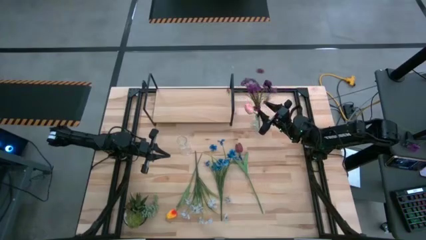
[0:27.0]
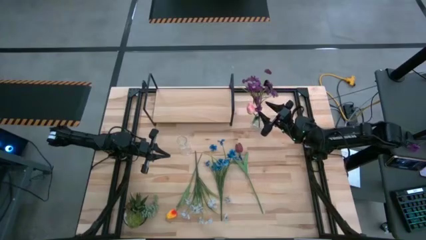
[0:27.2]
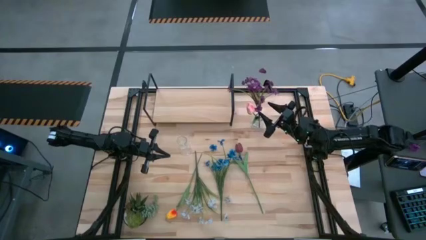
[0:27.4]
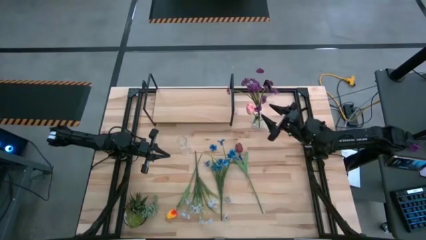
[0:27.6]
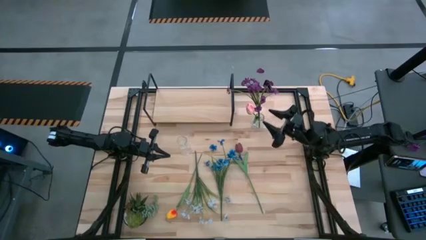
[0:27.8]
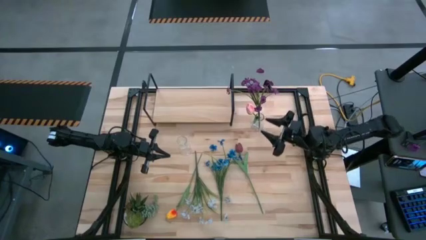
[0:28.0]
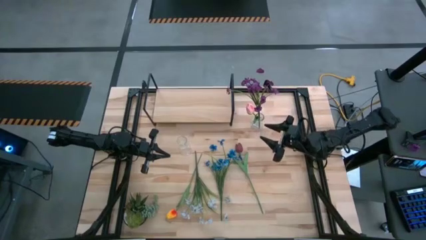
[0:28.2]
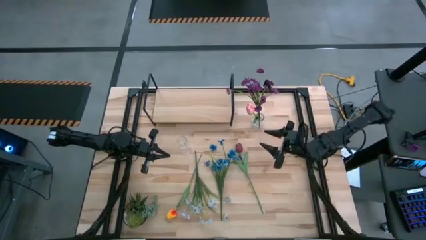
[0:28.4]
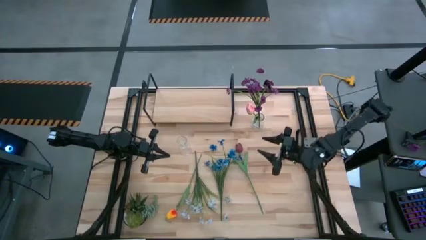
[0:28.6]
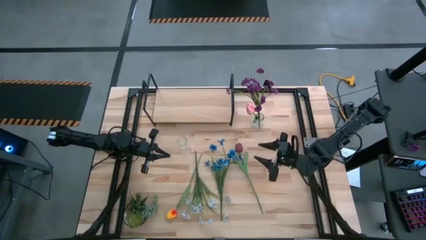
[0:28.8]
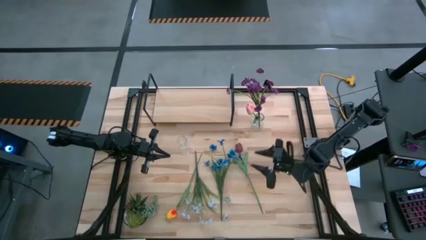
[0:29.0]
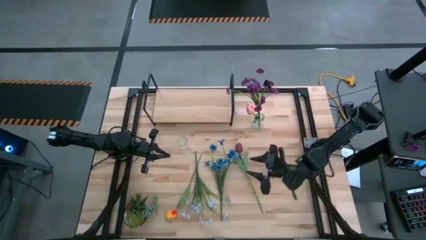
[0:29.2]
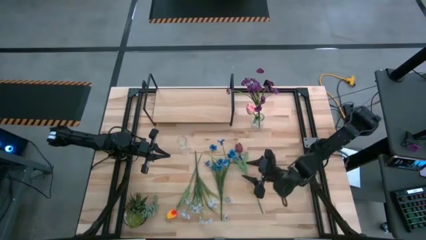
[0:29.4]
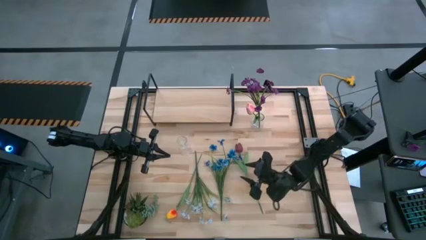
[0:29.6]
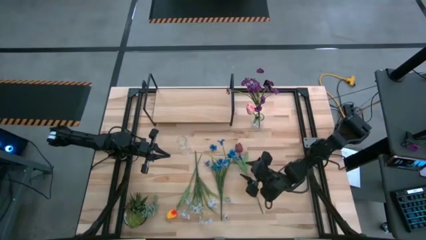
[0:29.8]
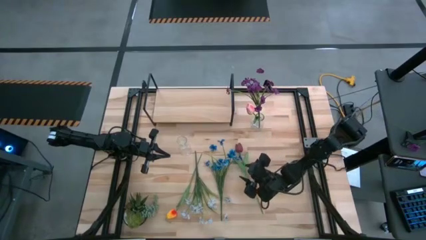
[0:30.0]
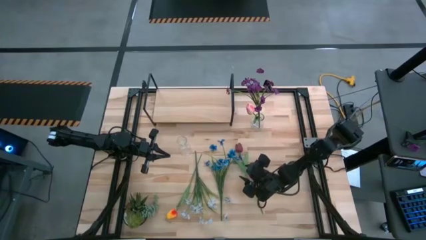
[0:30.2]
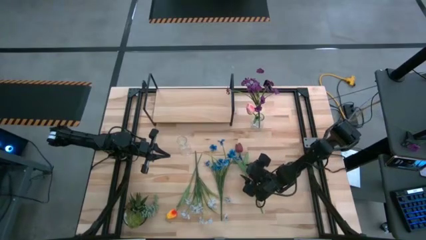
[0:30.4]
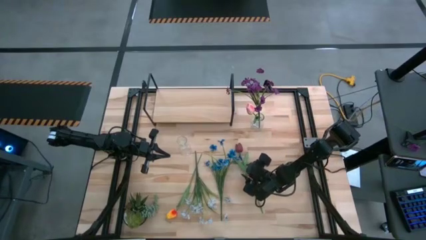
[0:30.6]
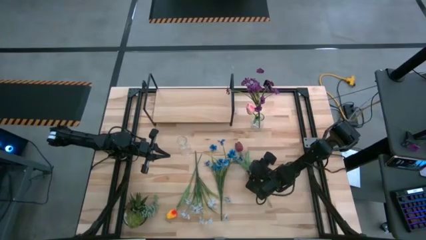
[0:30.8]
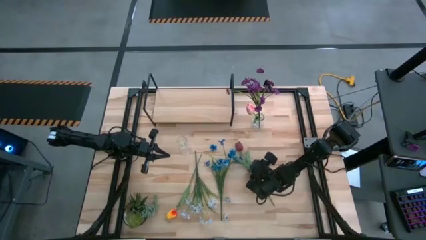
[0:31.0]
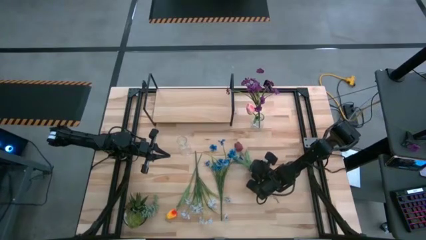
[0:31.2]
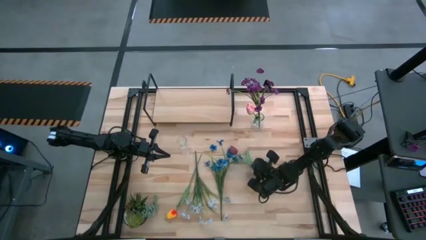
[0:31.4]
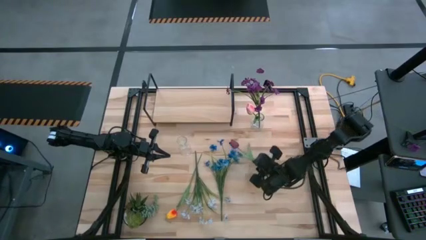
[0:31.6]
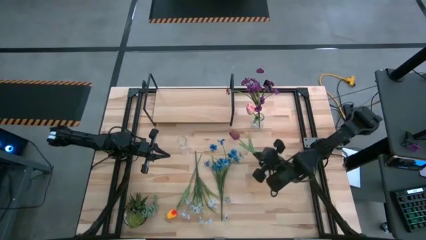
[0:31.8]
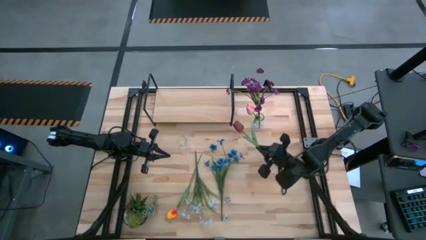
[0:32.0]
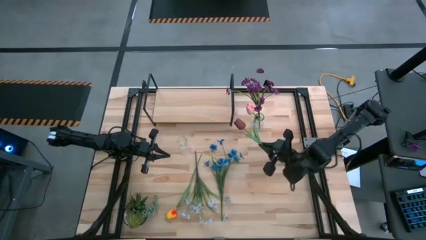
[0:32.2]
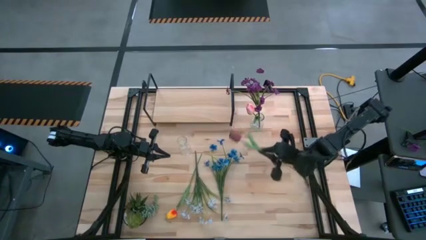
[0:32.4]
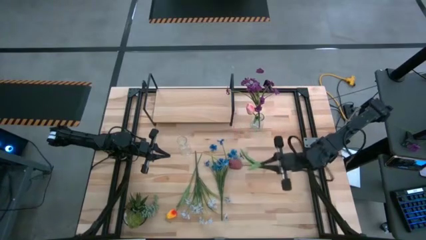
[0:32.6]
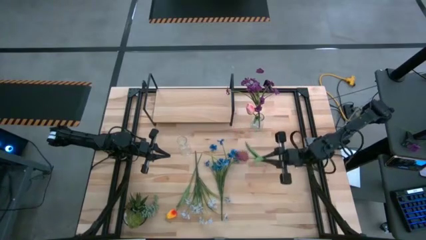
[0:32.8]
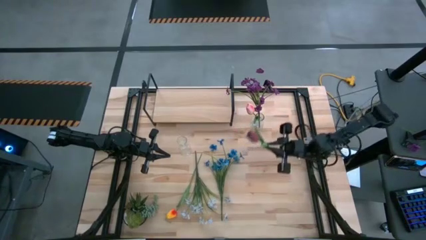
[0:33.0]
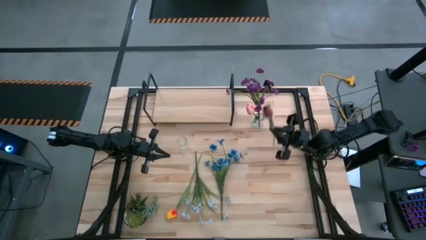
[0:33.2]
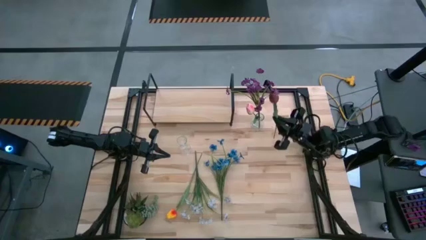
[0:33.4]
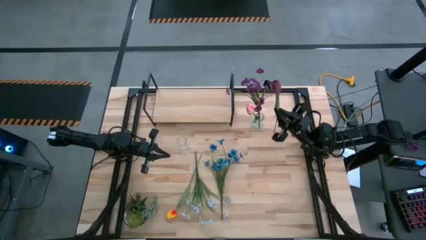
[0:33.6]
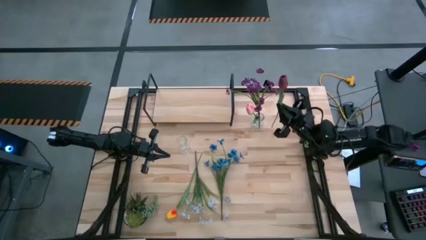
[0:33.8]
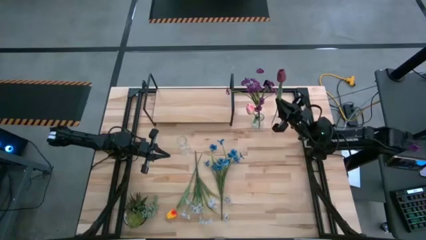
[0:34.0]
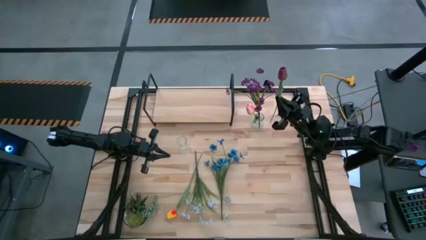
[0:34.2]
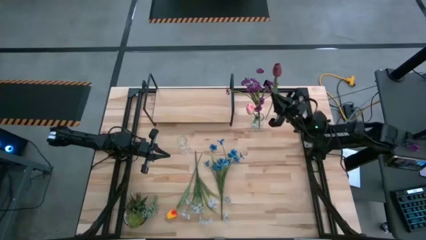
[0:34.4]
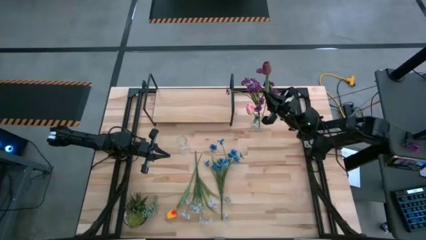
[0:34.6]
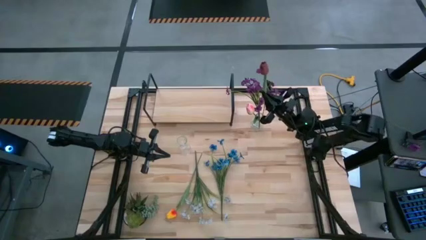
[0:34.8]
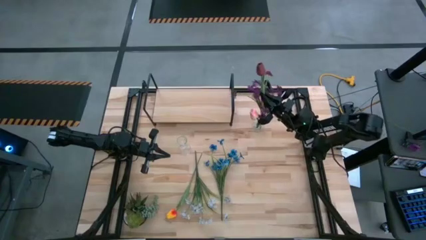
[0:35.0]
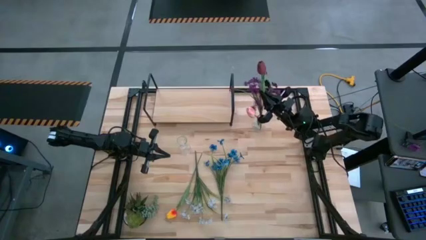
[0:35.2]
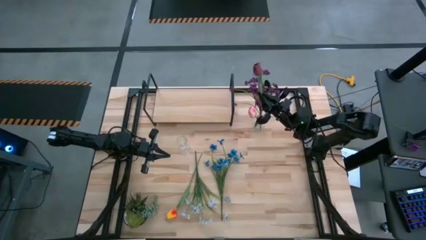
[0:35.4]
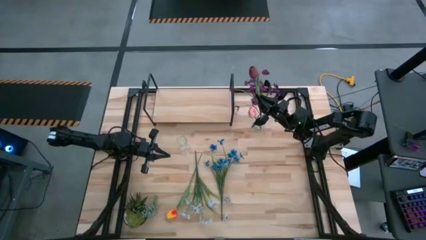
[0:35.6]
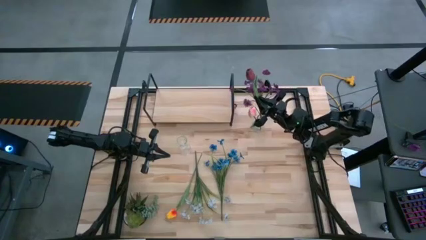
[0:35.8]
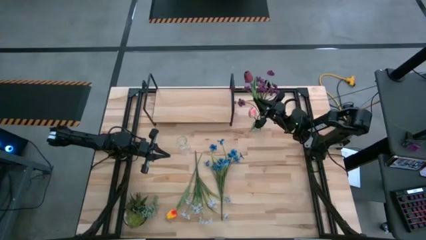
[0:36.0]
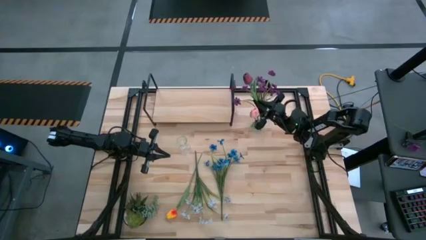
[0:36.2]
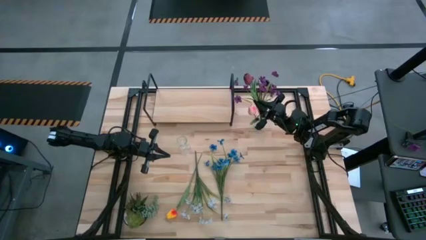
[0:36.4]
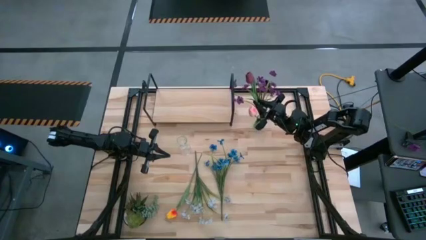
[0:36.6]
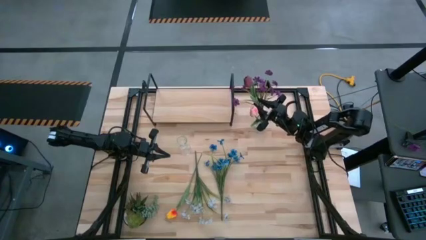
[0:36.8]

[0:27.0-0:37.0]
Task: Pick and place flowers into a vace then onto a shelf
Put the red flower into the right transparent vase
